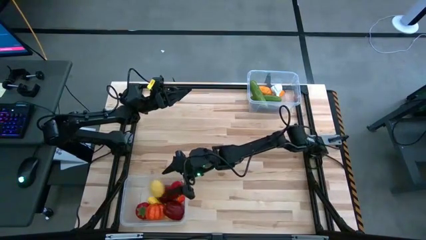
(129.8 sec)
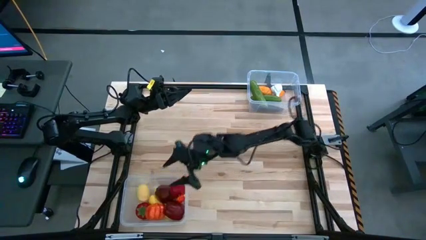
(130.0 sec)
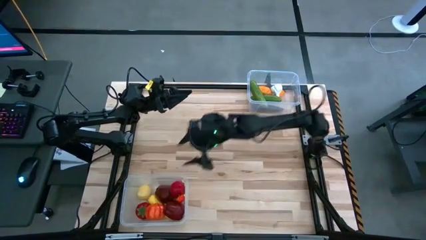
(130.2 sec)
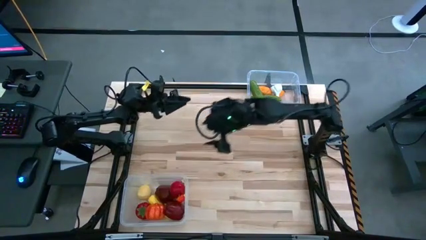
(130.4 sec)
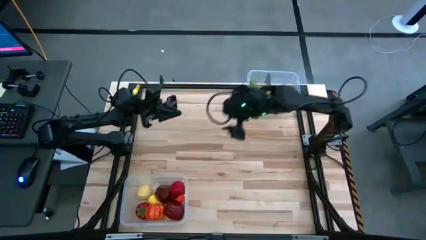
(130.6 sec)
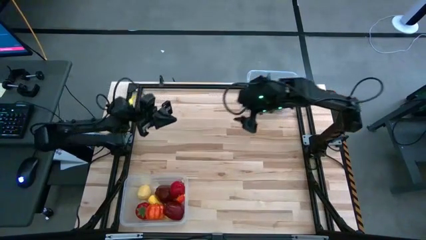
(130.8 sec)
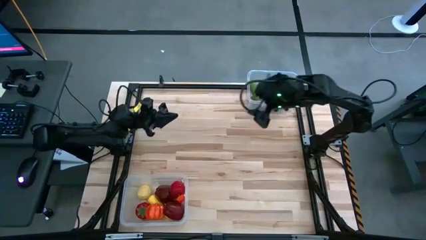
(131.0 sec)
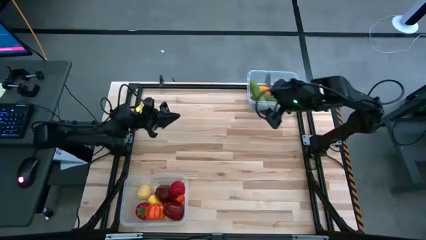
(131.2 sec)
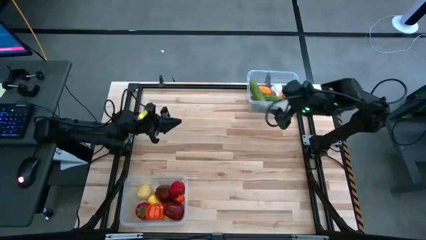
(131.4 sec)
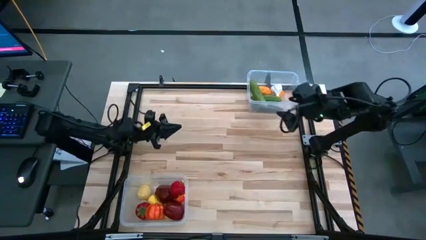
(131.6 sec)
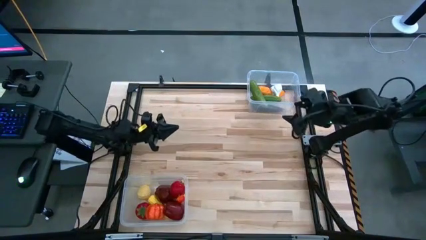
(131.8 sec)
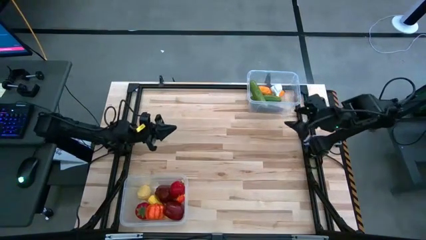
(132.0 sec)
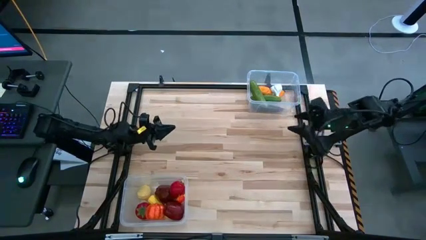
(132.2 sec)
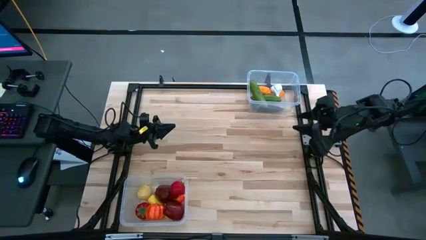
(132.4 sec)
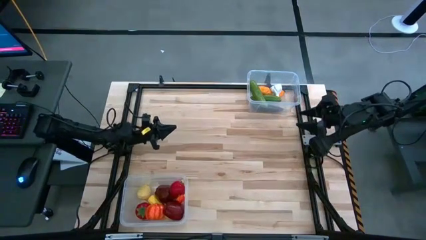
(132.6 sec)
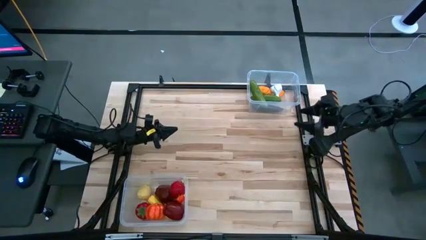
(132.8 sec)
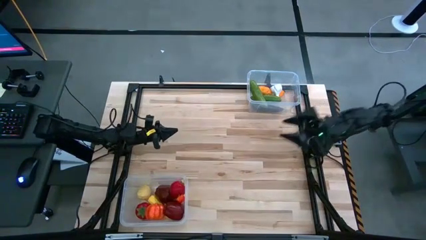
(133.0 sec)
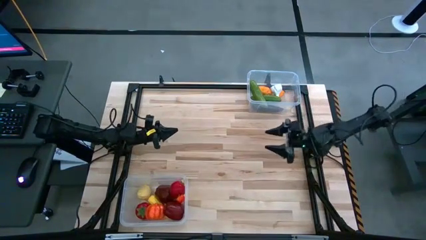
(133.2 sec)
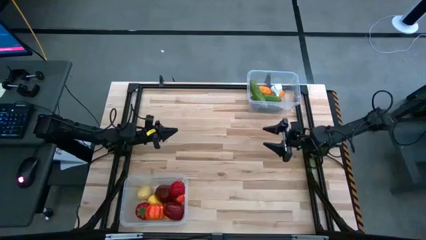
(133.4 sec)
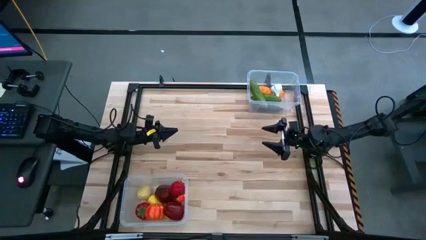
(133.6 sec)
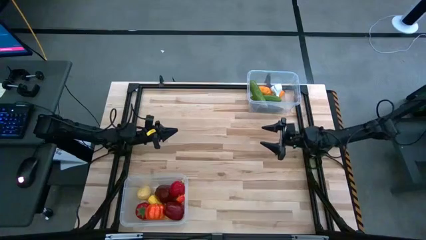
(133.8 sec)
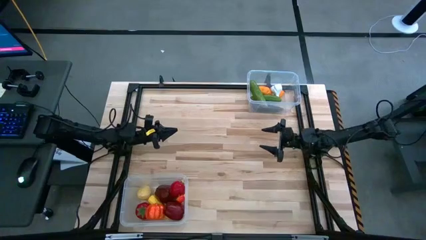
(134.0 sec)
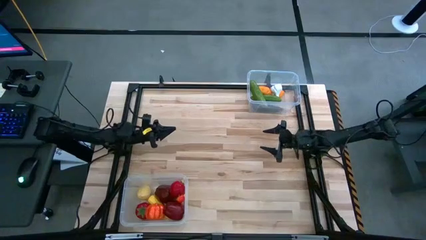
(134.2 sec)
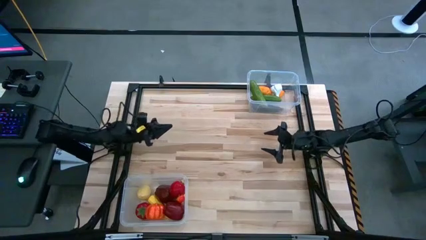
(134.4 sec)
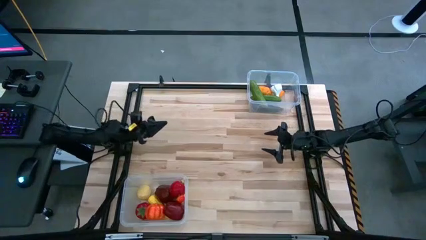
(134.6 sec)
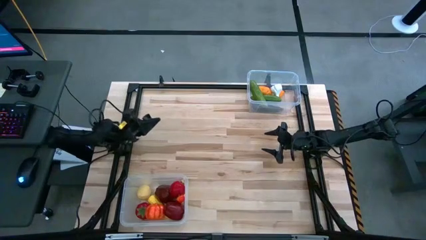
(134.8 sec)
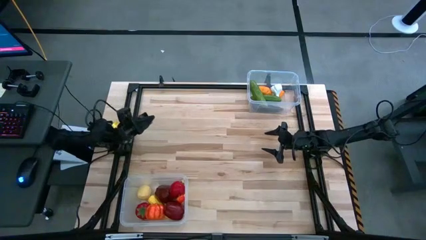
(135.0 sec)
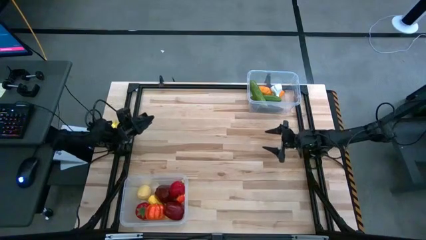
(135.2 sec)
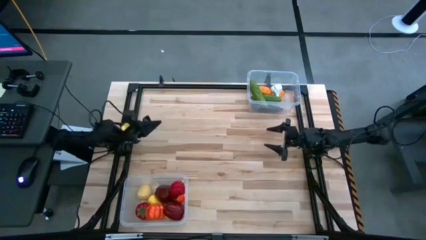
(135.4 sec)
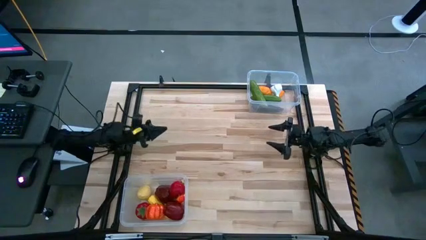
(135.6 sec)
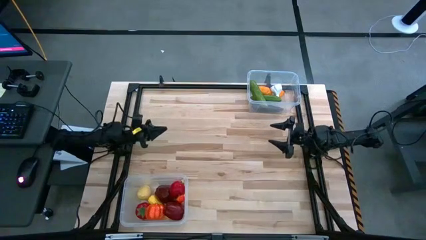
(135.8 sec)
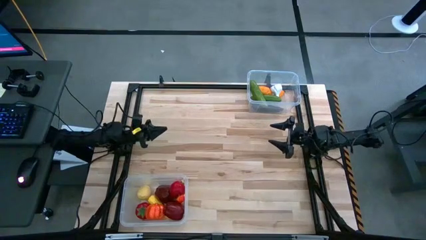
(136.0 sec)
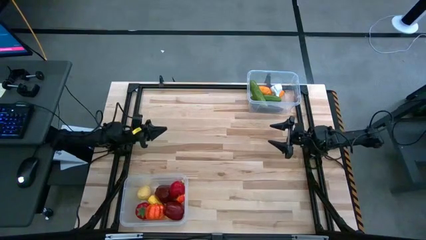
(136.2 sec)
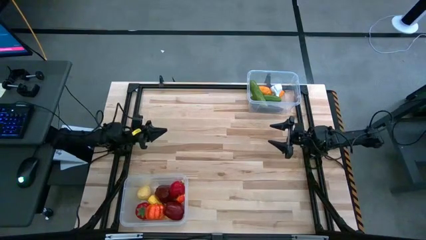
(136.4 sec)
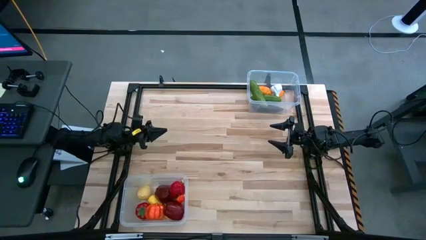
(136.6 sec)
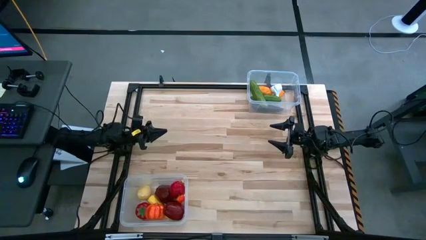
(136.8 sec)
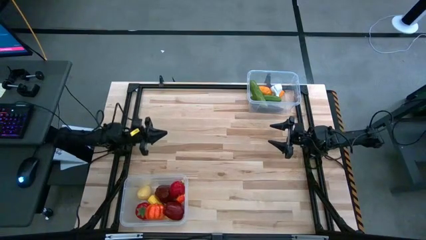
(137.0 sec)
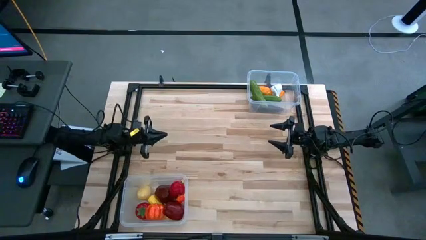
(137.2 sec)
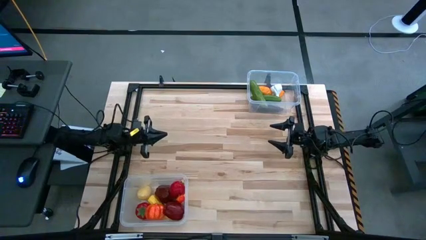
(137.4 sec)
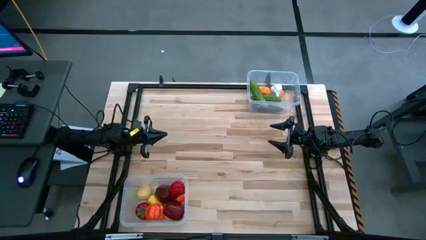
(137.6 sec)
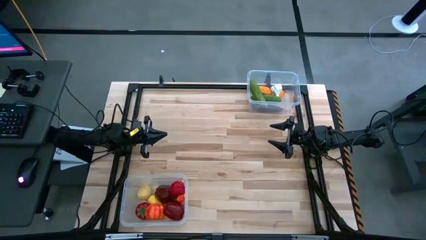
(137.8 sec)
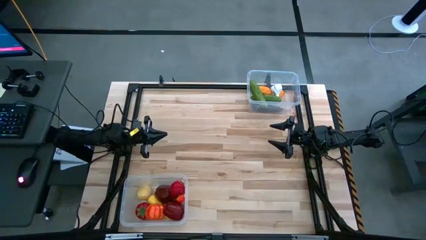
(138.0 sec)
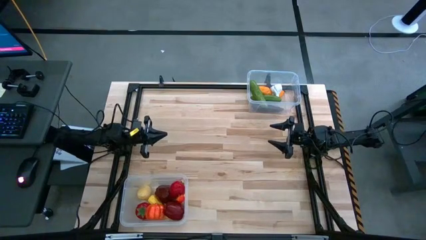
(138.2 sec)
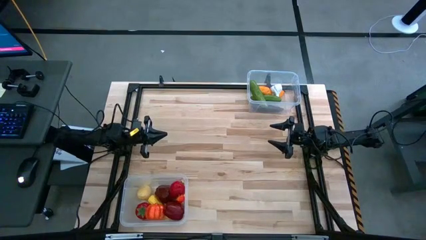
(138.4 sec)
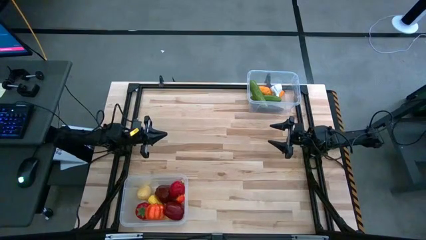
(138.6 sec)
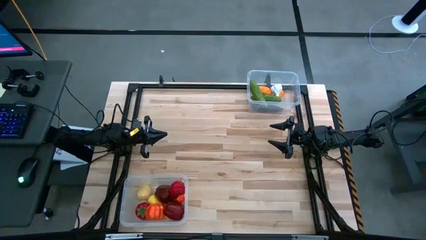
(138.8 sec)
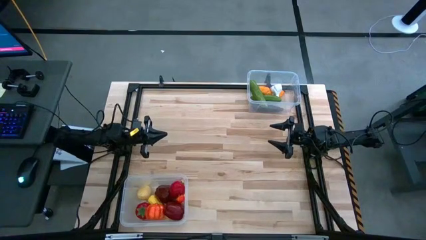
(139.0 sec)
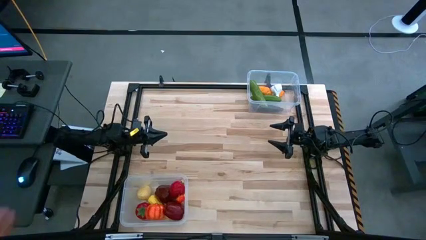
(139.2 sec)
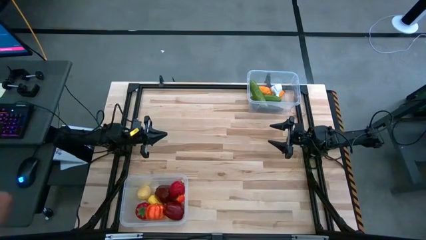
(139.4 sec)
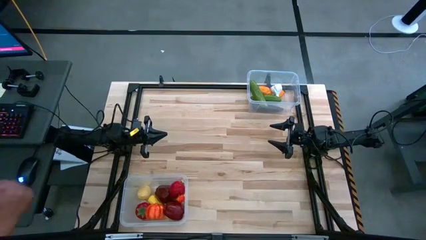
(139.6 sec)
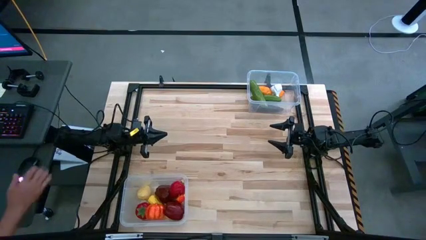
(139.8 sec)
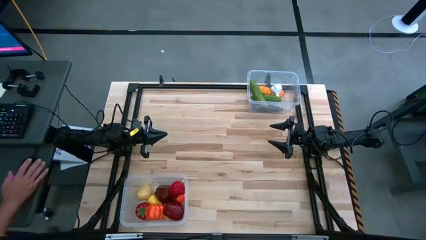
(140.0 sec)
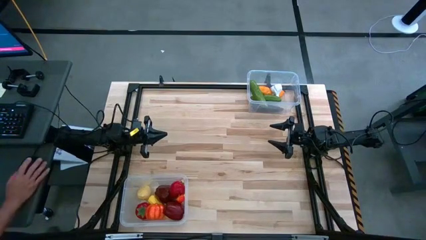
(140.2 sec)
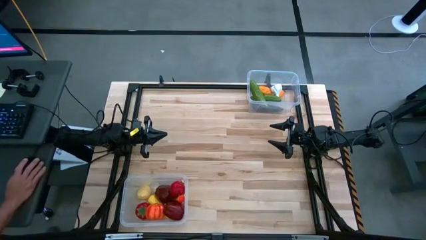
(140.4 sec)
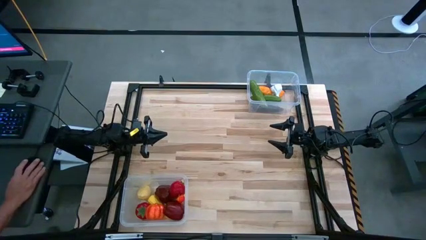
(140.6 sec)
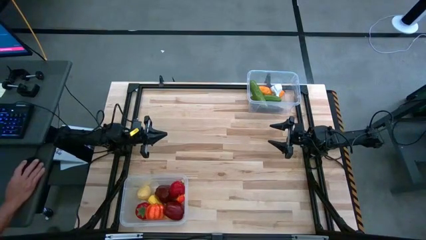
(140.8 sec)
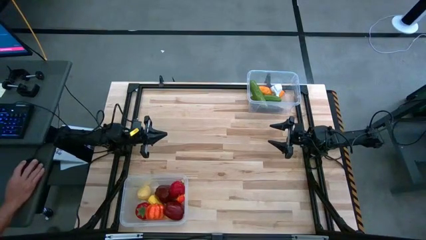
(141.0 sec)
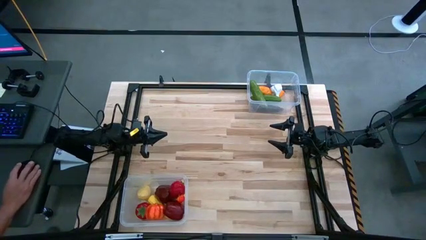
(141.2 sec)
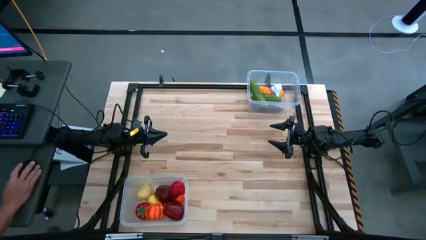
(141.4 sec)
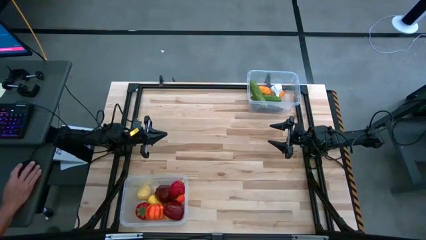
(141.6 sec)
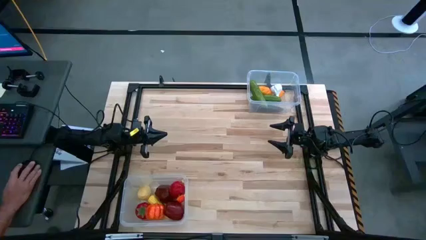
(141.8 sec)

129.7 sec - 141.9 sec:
Task: Sort produce into baskets
Return to Home Position

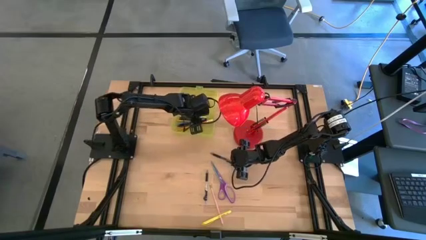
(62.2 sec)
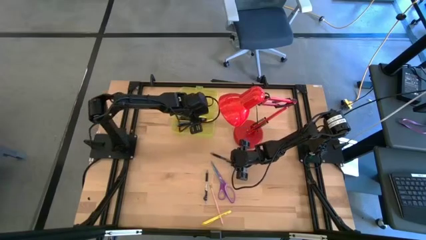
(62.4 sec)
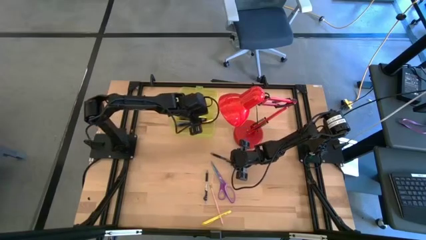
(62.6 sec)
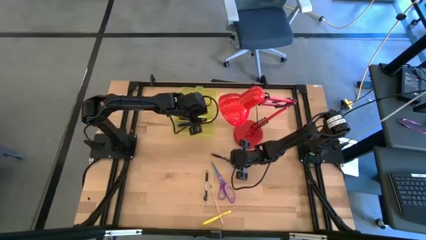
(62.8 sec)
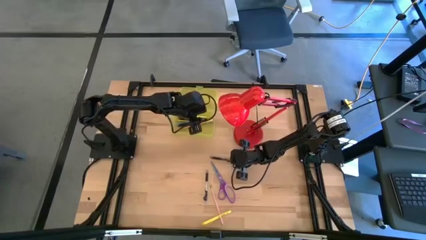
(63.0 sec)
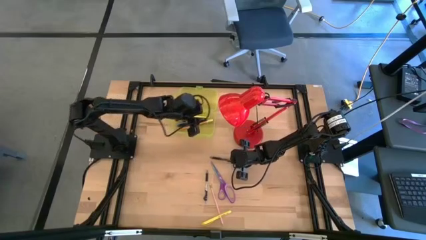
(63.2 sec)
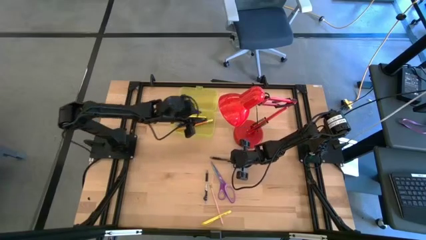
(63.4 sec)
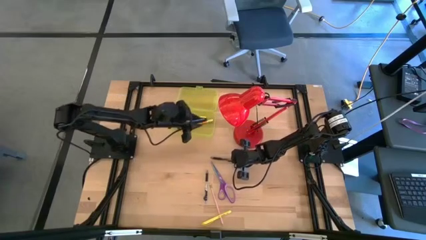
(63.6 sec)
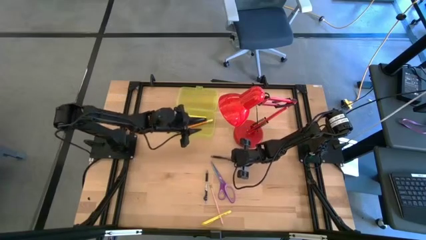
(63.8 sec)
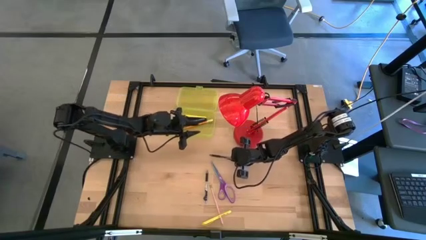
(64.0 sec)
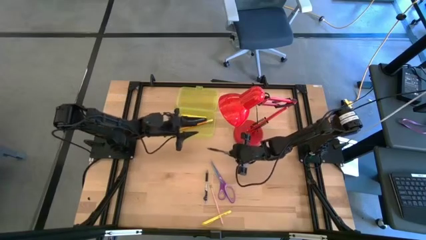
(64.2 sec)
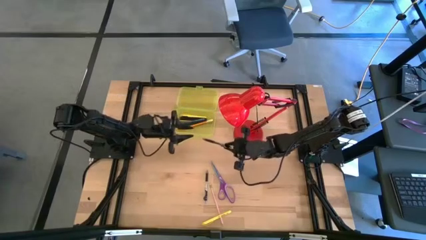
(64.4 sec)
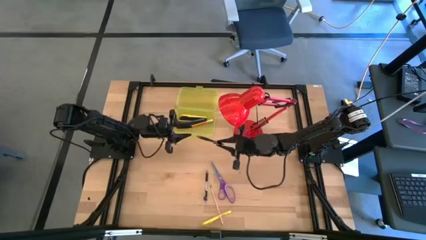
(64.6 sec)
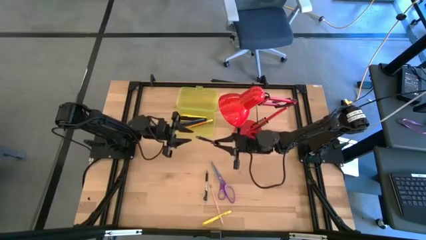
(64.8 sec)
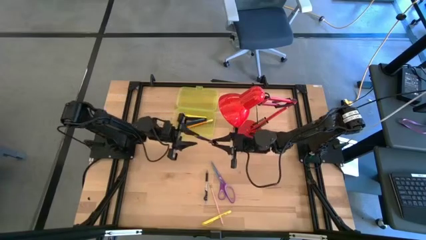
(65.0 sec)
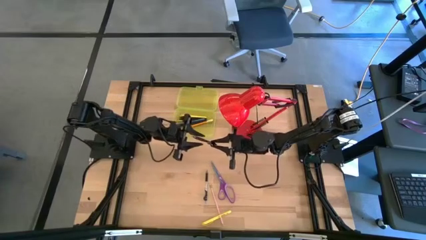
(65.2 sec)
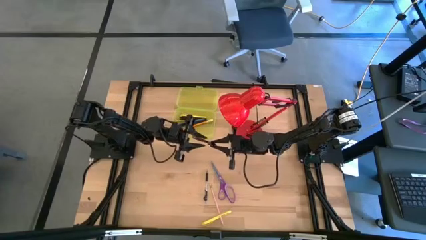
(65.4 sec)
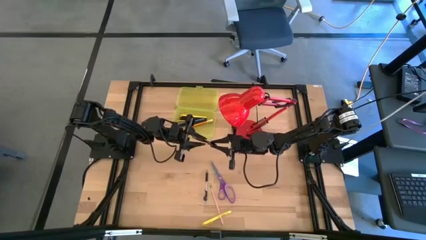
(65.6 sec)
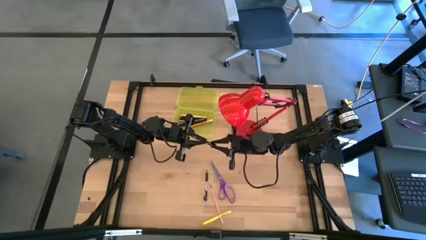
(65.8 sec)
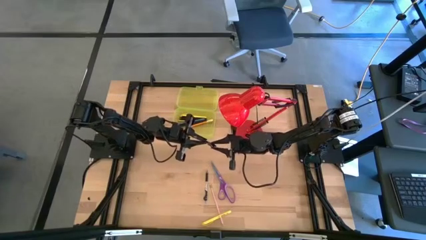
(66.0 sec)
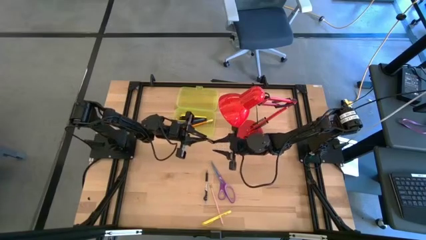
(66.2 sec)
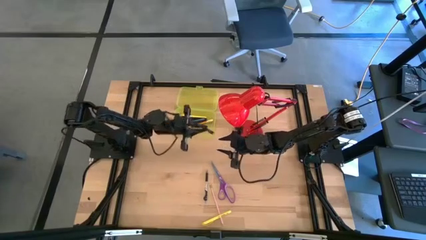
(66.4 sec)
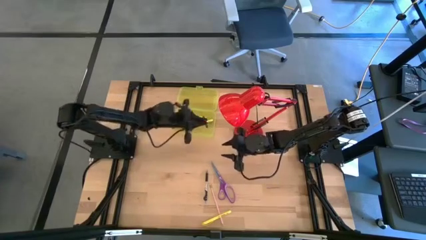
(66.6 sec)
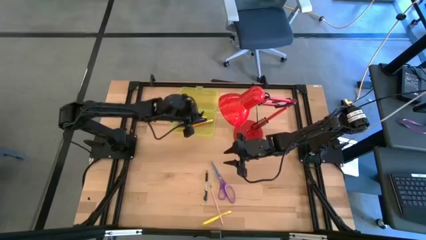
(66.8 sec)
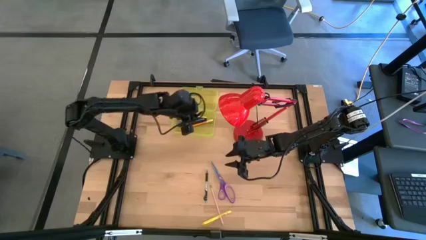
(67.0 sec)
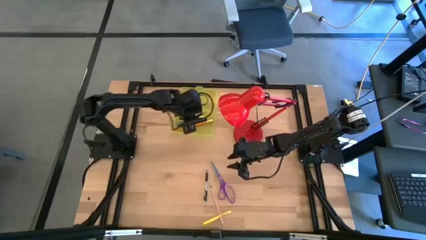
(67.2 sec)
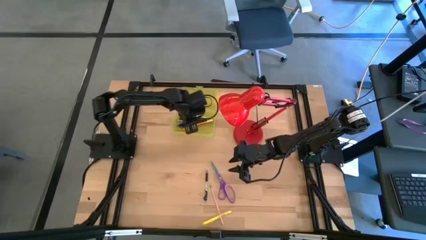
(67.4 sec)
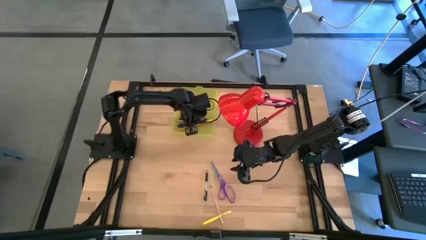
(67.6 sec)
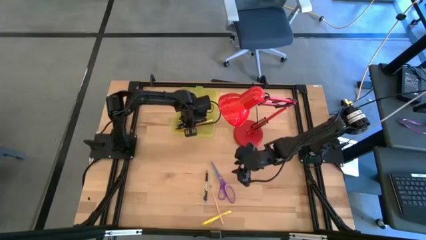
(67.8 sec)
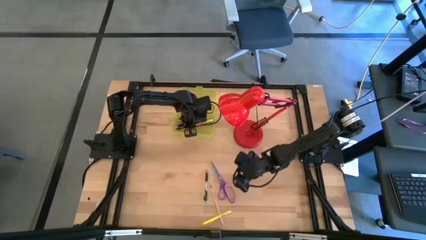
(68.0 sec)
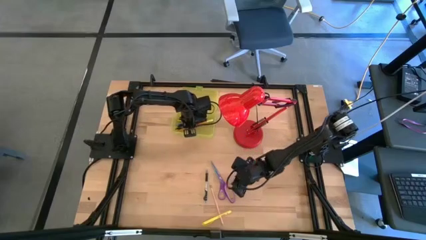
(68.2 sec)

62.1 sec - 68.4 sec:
Task: Pick & place school supplies into a supply box
Put the top black transparent pen into the yellow supply box
